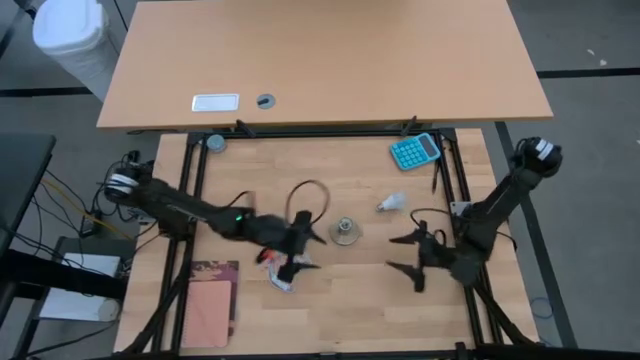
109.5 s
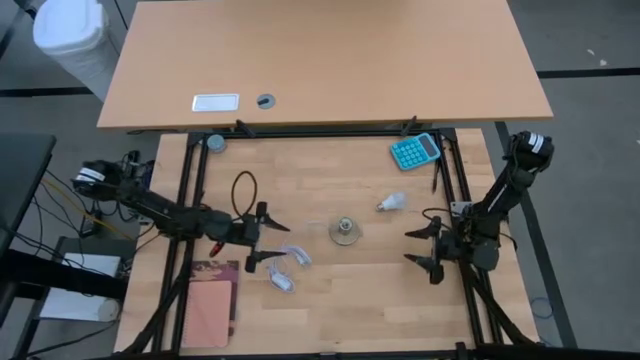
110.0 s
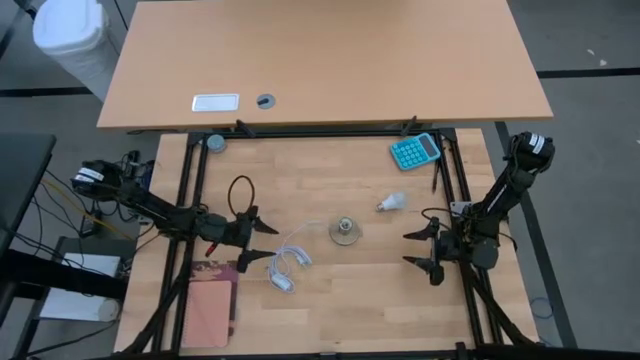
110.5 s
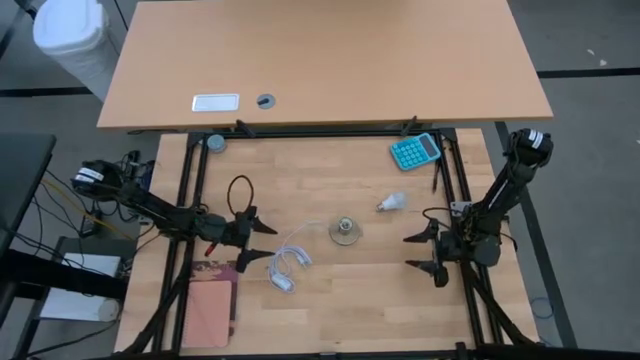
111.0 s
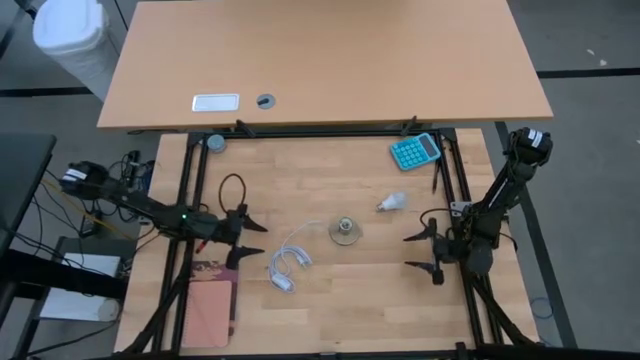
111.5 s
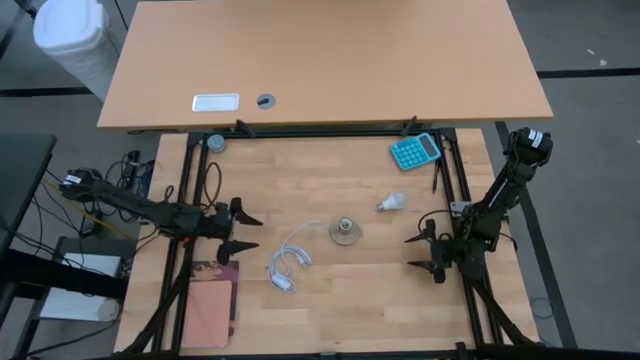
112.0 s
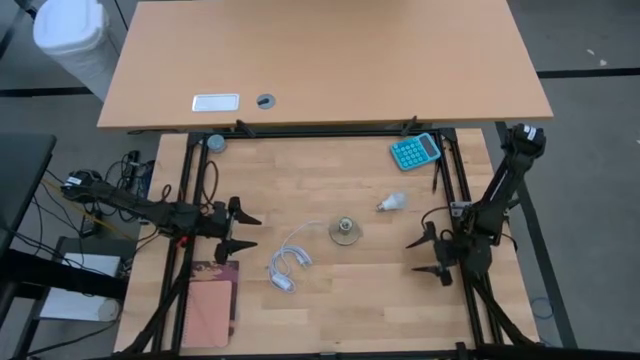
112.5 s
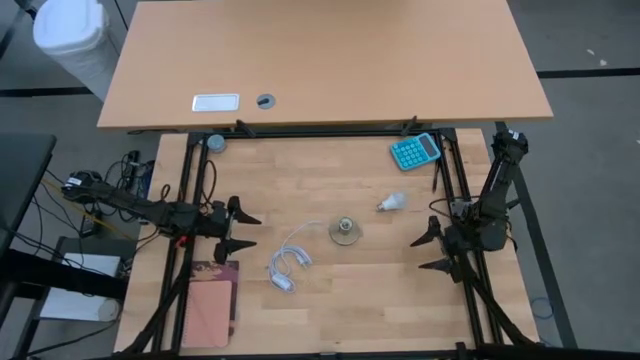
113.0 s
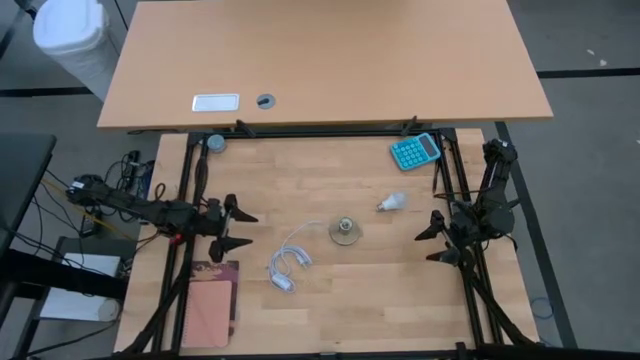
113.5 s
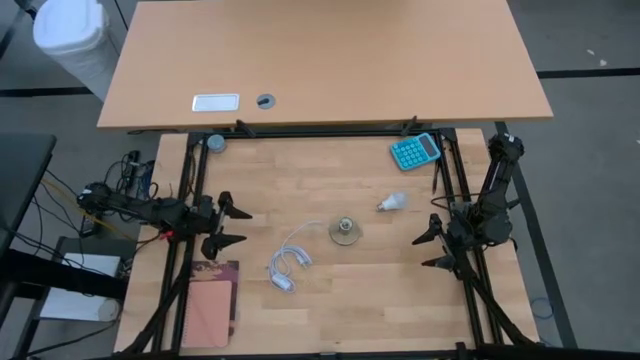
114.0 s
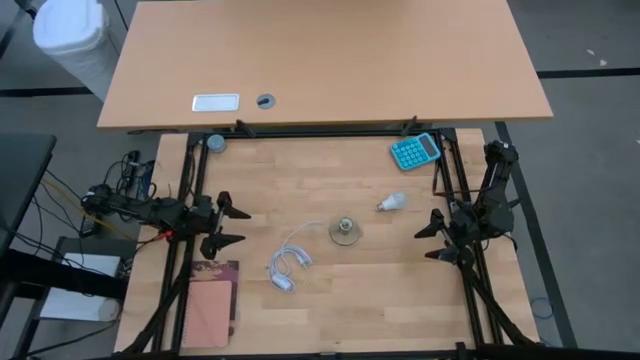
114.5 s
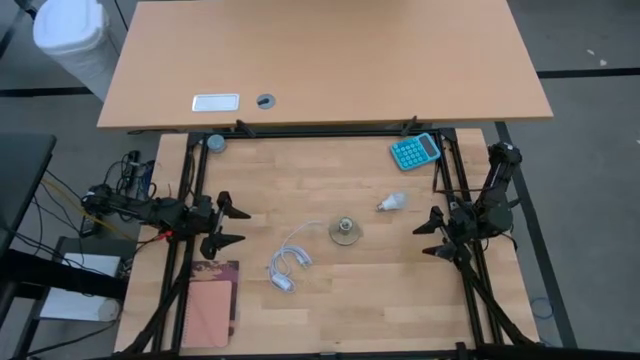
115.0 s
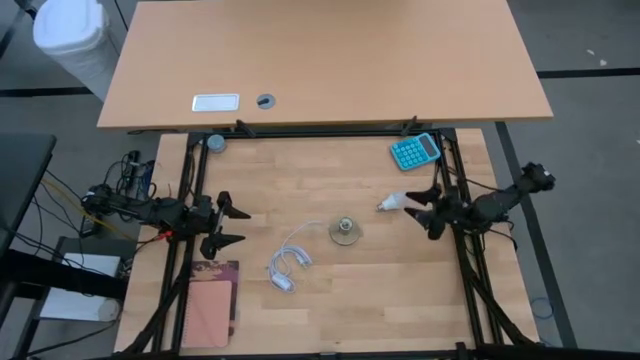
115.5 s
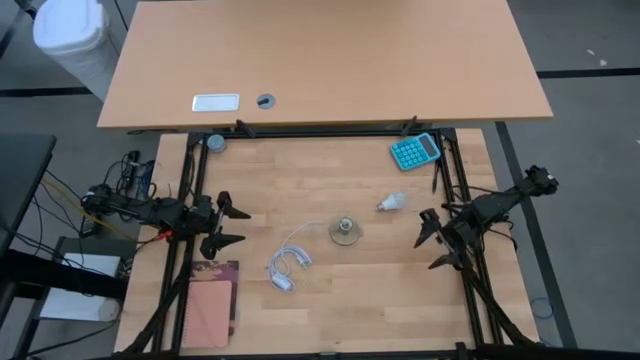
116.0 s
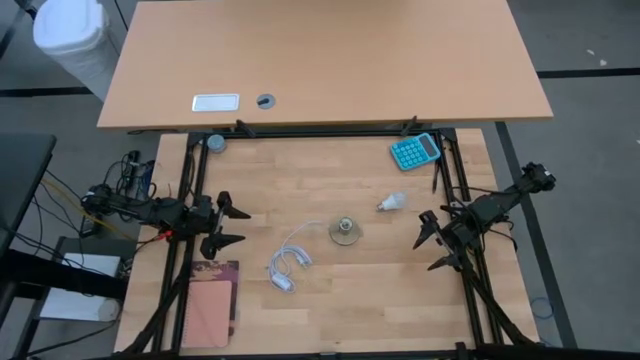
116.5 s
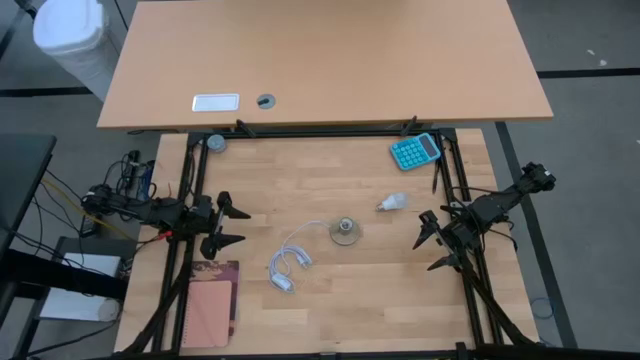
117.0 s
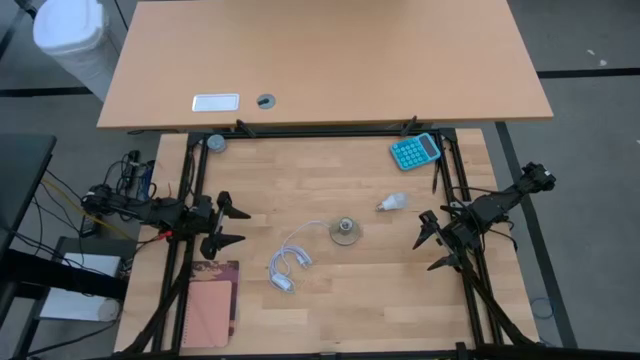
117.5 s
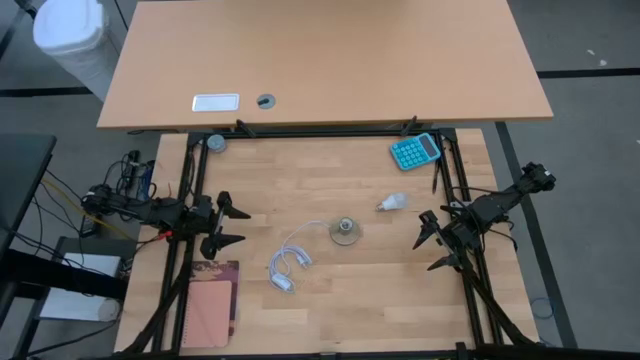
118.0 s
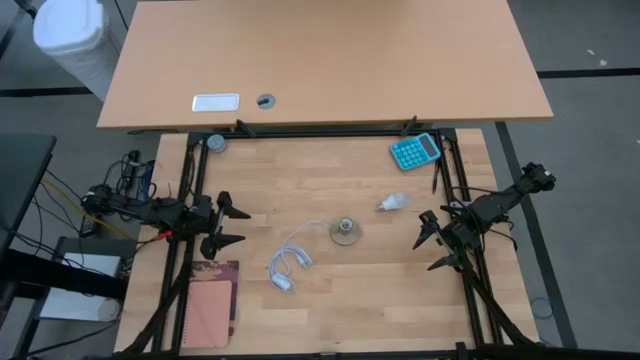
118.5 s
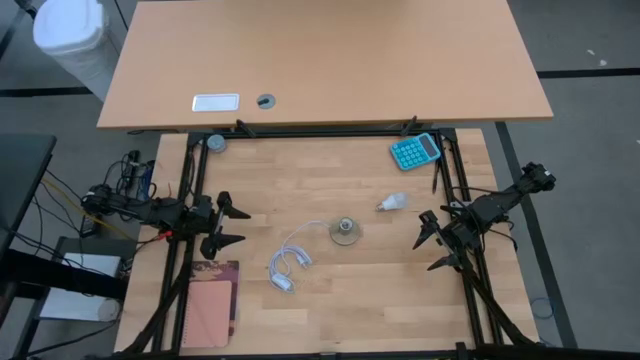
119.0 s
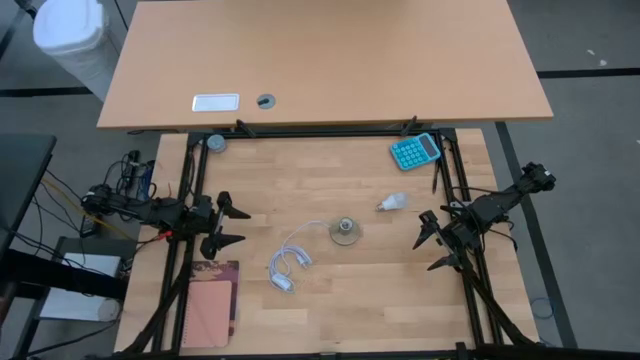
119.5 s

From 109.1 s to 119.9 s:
Task: Screw lightbulb
Return to Home Position

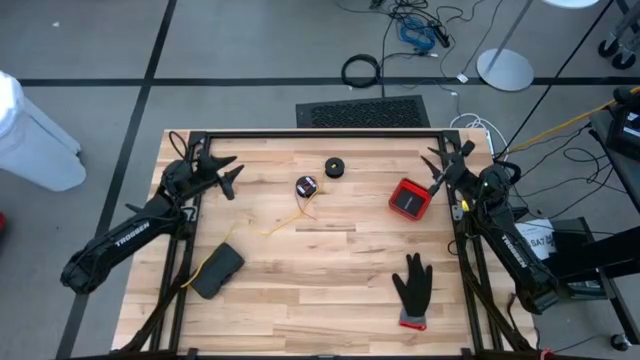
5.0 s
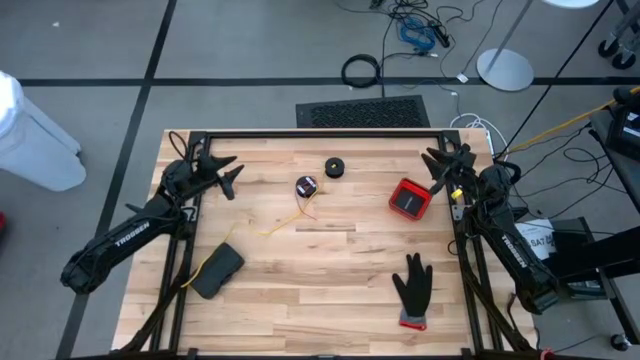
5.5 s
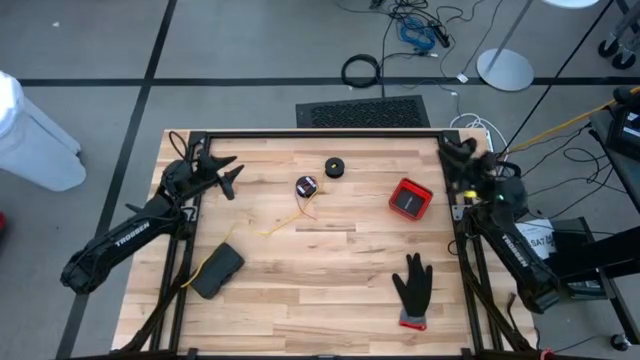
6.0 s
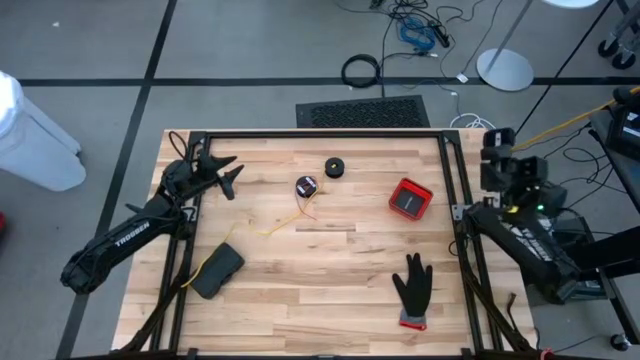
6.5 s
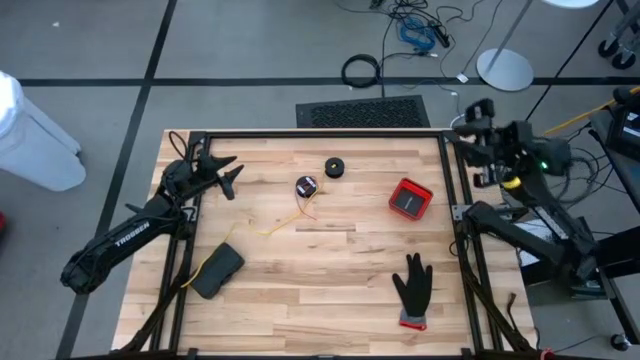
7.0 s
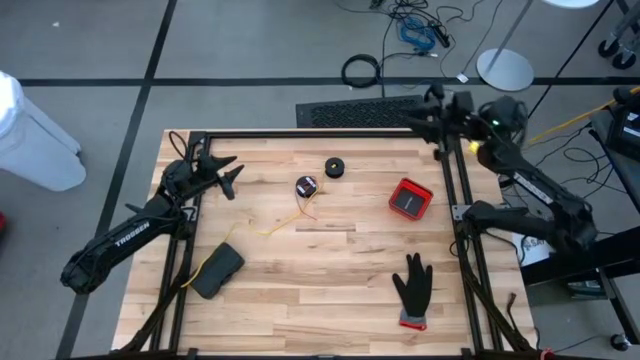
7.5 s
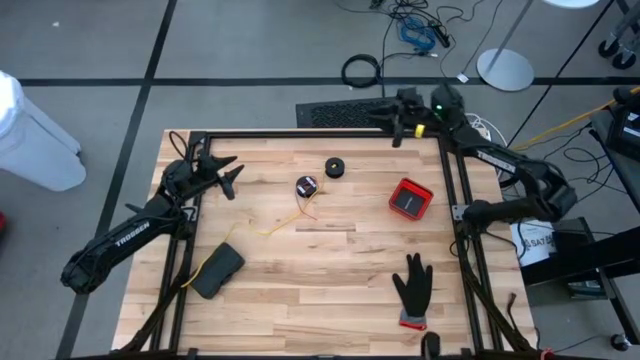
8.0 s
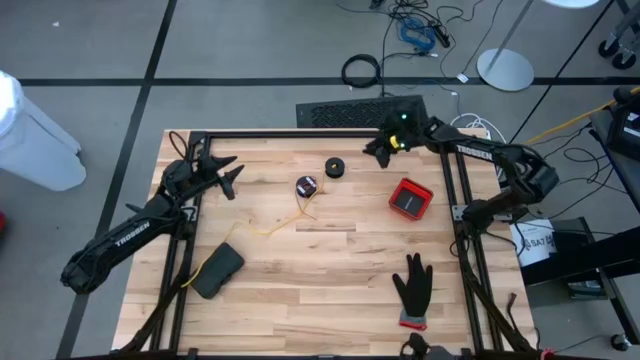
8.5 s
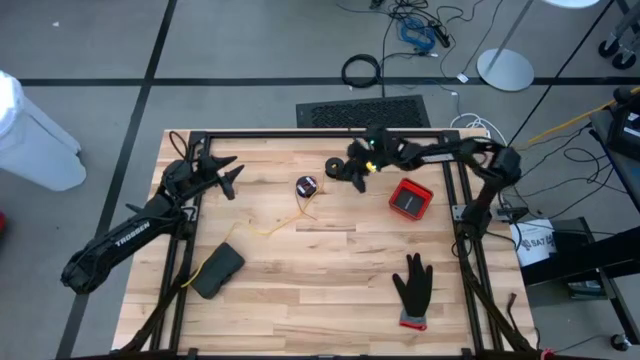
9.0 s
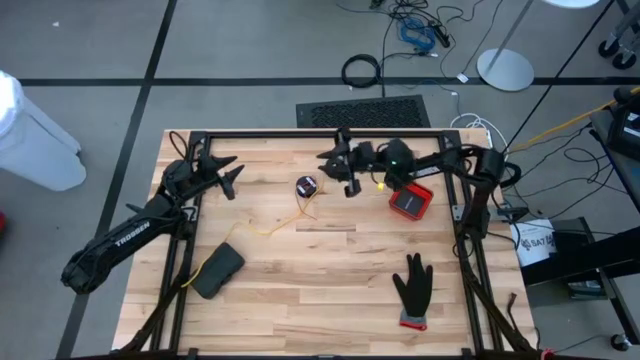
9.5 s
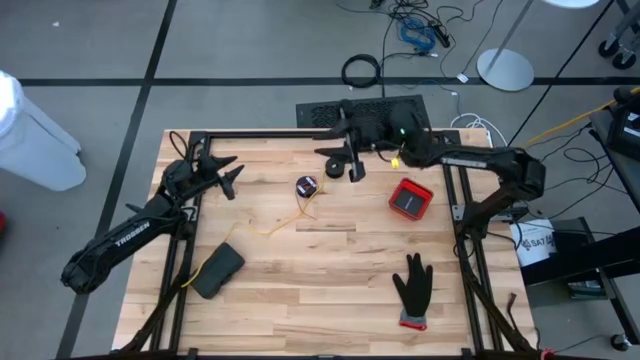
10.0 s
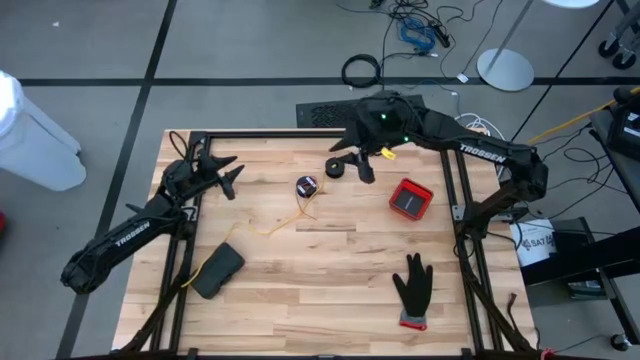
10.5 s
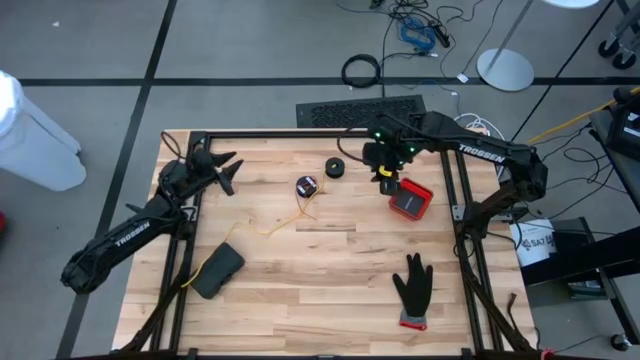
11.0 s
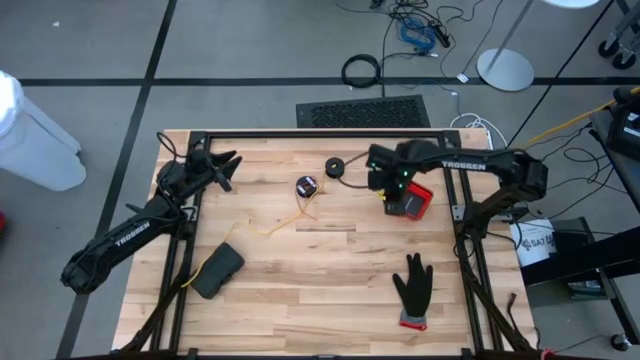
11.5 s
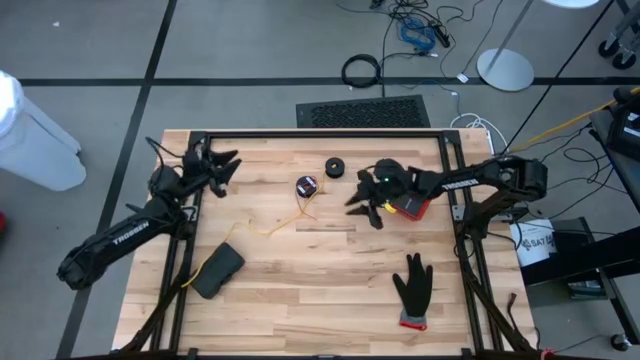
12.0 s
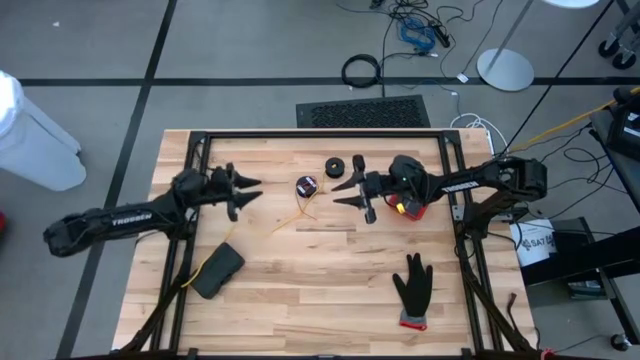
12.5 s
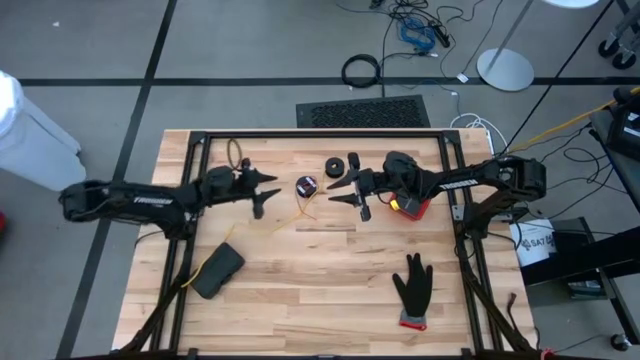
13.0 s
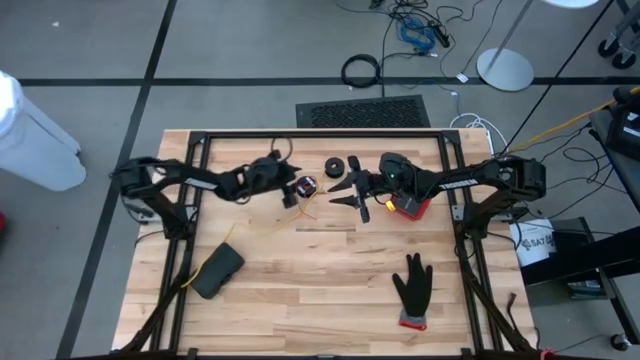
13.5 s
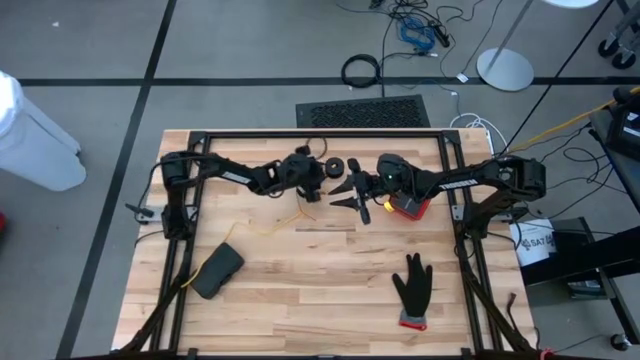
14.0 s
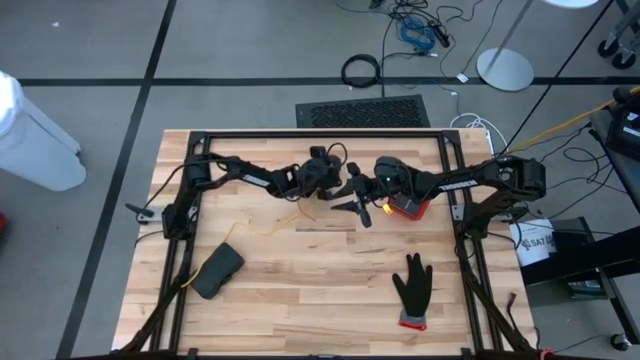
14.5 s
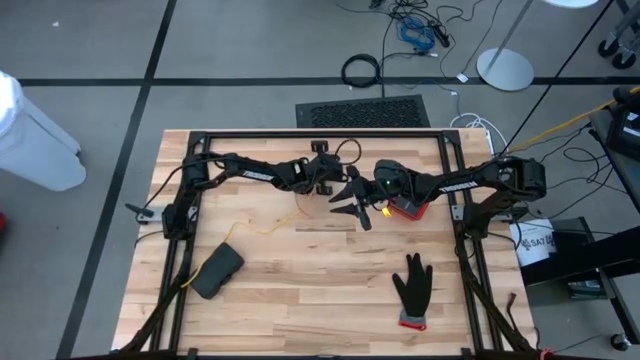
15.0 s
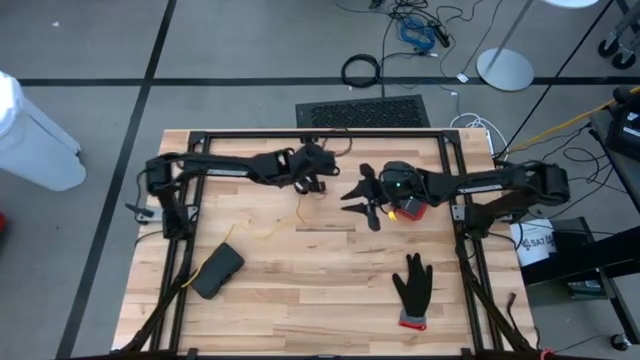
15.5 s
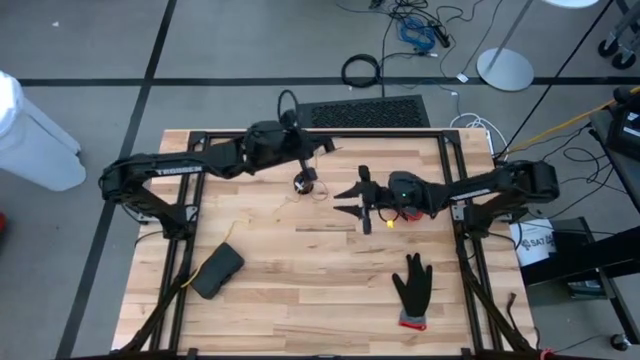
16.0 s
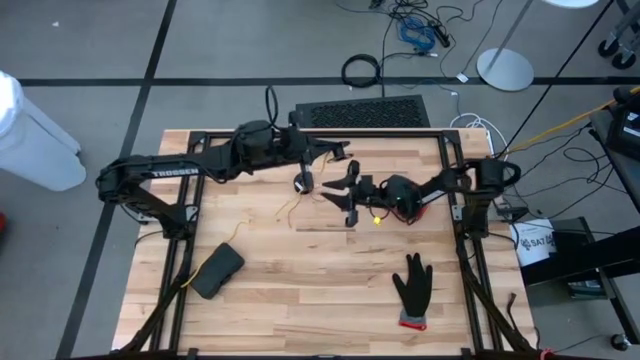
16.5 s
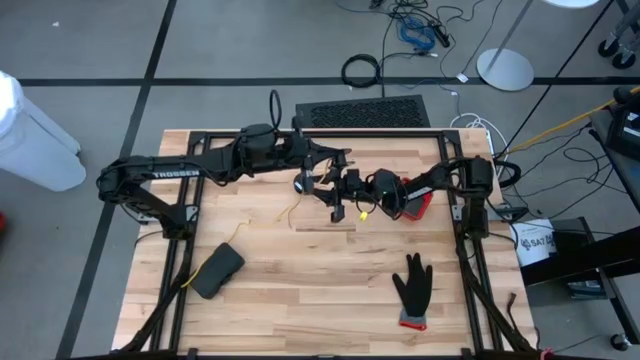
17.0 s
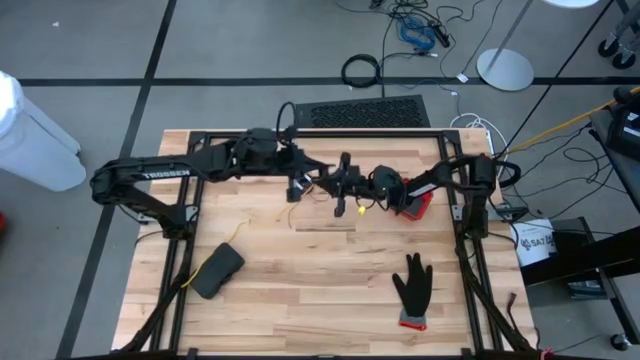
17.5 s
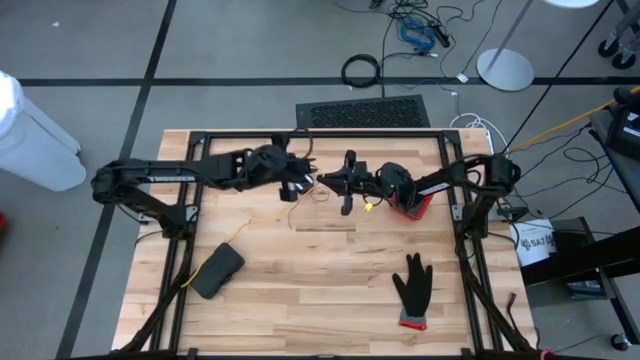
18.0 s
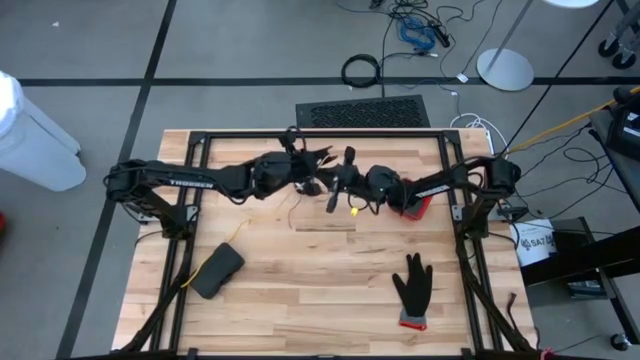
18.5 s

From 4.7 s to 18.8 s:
Task: Coil cords
Coil the yellow wire onto the black spool
